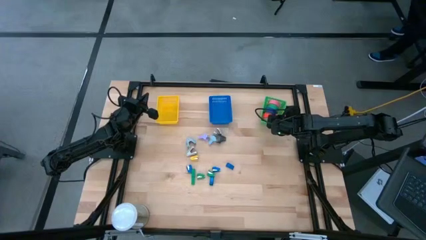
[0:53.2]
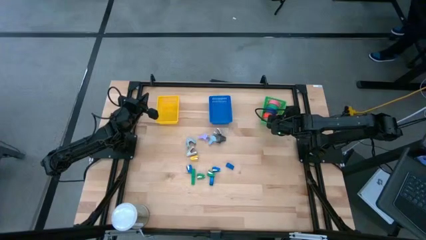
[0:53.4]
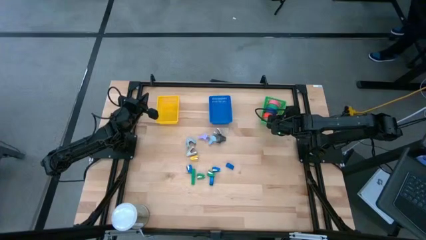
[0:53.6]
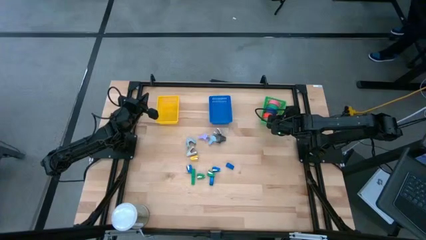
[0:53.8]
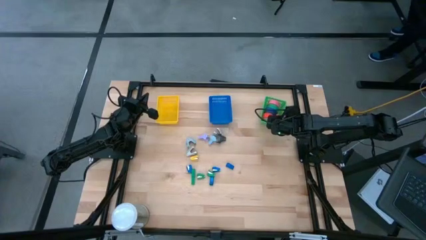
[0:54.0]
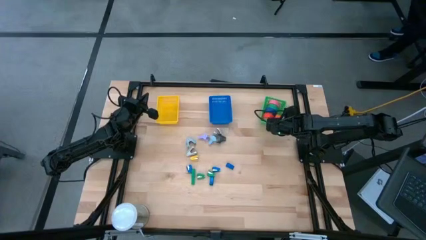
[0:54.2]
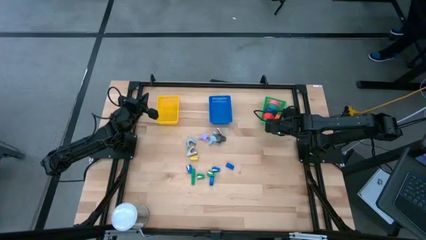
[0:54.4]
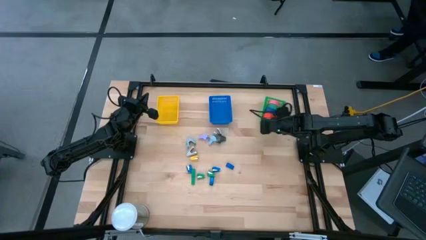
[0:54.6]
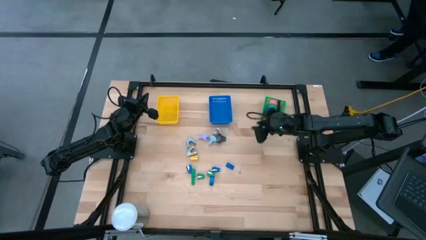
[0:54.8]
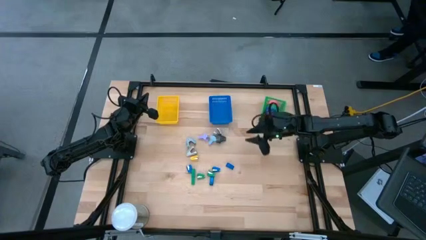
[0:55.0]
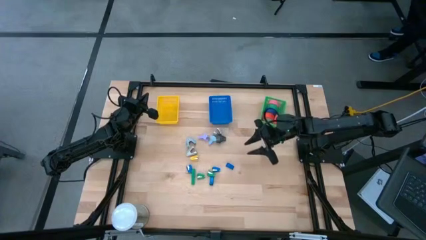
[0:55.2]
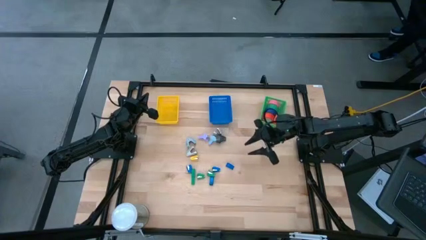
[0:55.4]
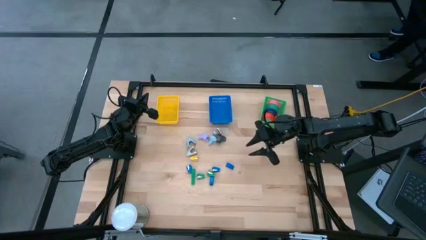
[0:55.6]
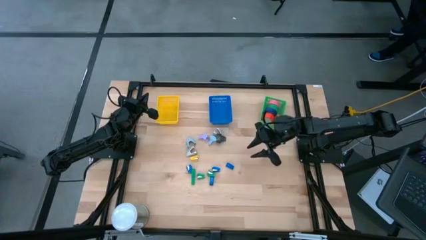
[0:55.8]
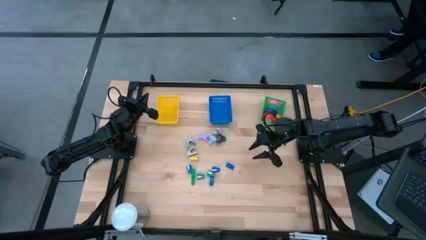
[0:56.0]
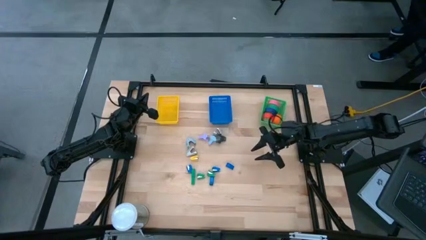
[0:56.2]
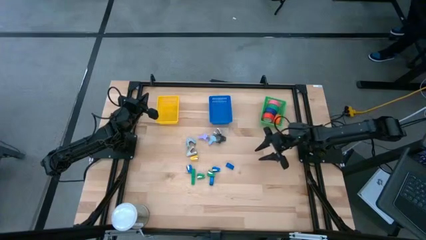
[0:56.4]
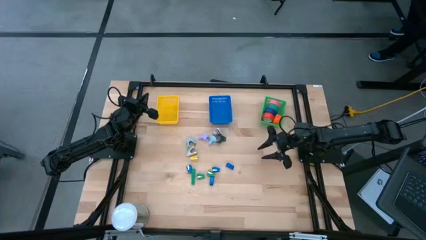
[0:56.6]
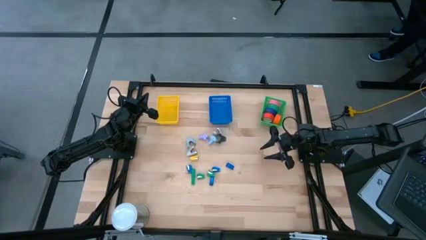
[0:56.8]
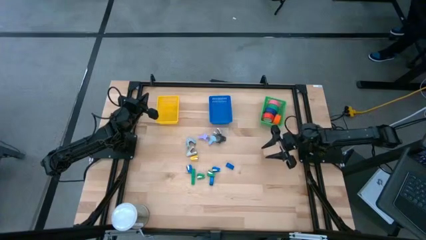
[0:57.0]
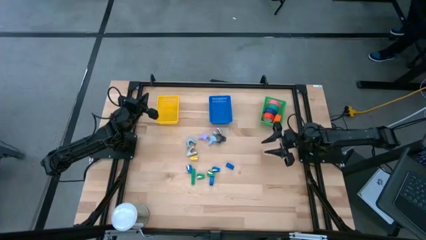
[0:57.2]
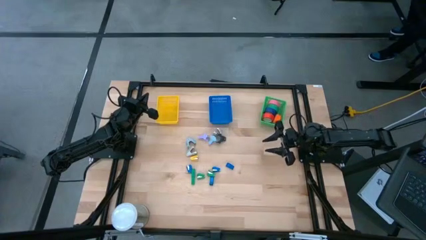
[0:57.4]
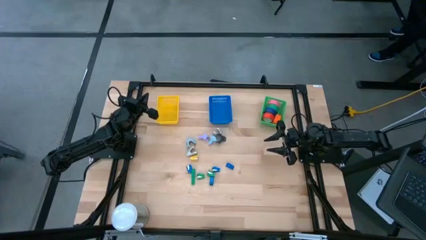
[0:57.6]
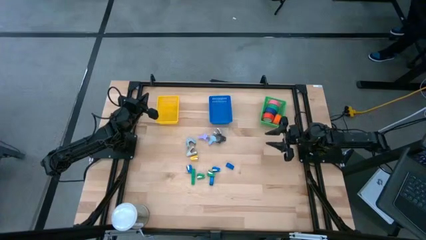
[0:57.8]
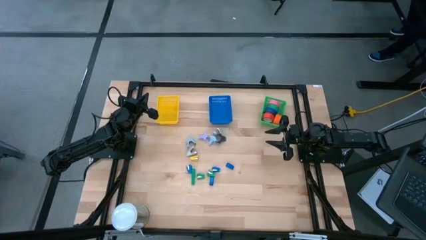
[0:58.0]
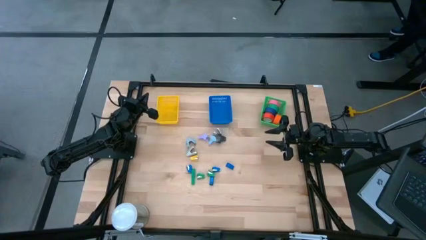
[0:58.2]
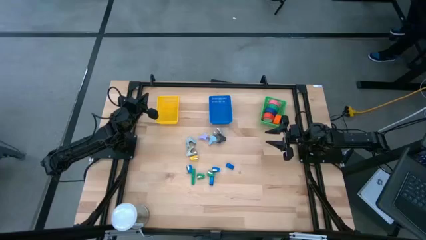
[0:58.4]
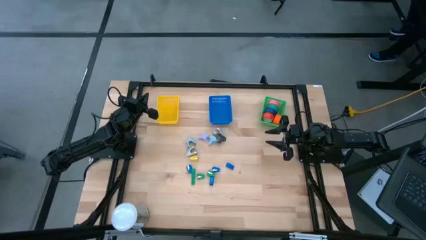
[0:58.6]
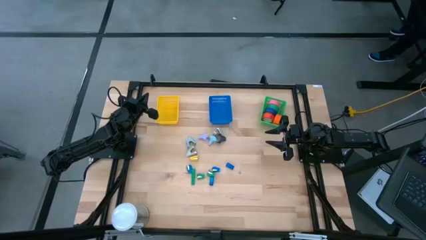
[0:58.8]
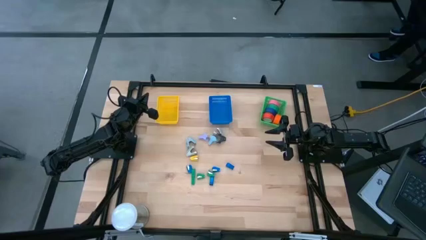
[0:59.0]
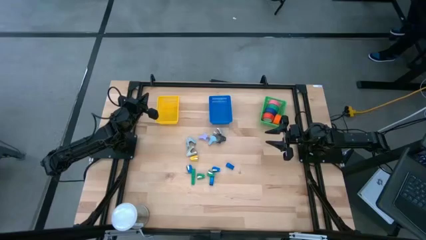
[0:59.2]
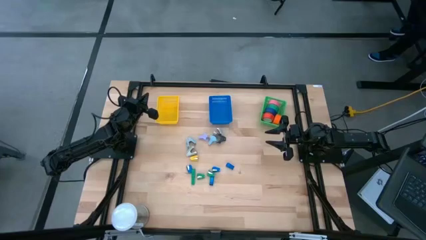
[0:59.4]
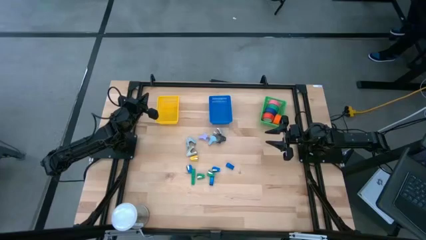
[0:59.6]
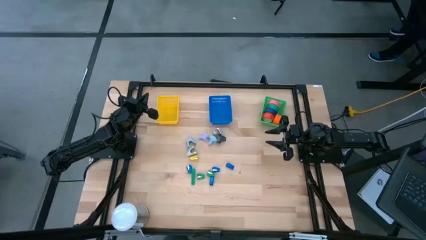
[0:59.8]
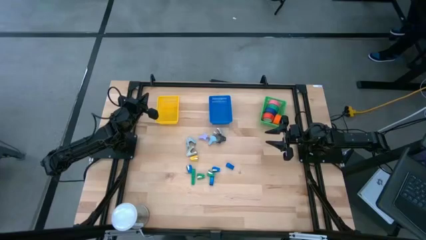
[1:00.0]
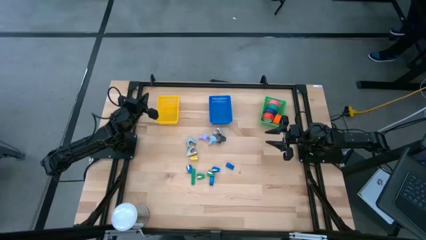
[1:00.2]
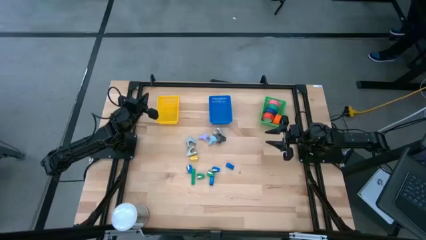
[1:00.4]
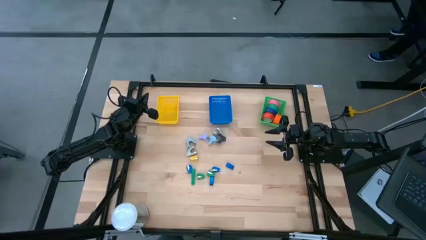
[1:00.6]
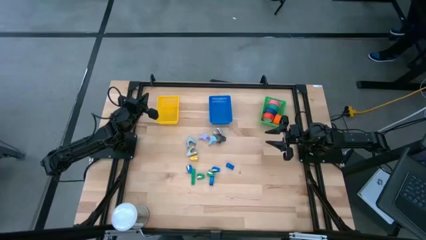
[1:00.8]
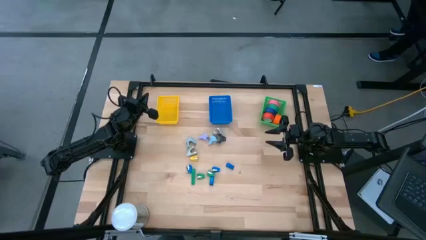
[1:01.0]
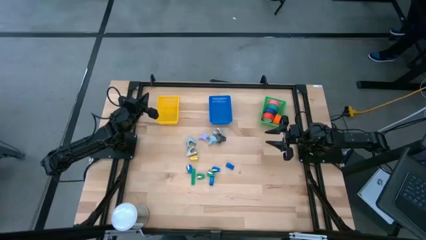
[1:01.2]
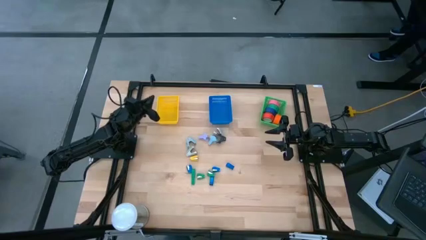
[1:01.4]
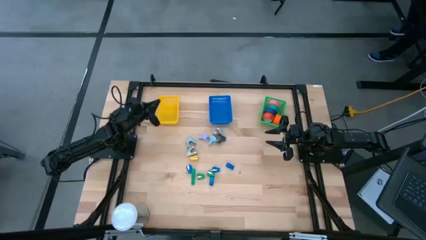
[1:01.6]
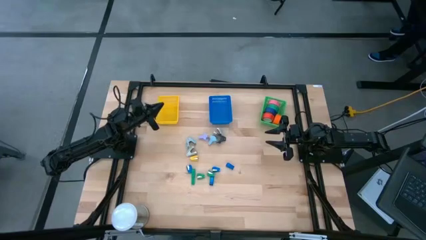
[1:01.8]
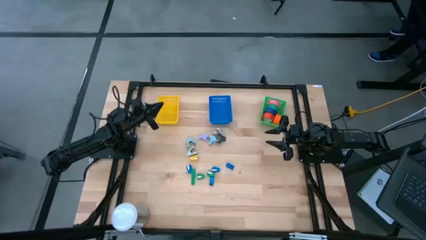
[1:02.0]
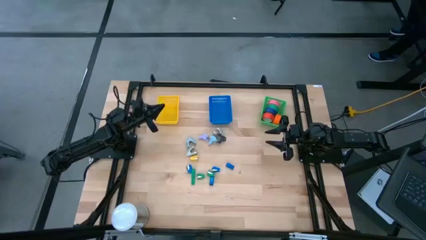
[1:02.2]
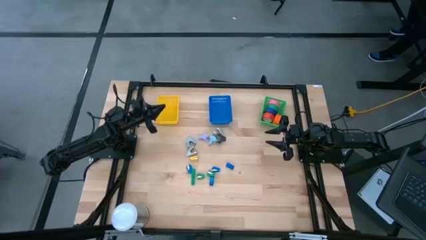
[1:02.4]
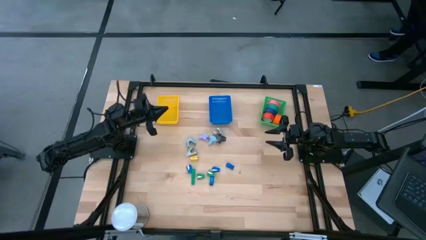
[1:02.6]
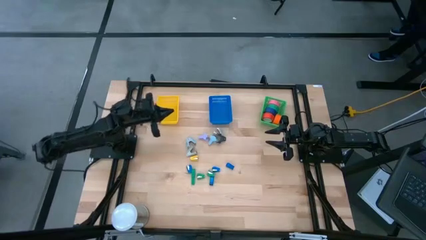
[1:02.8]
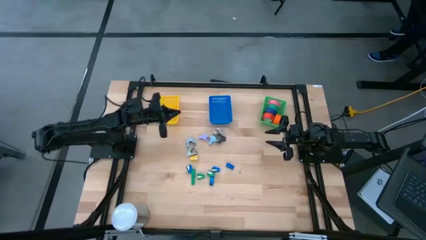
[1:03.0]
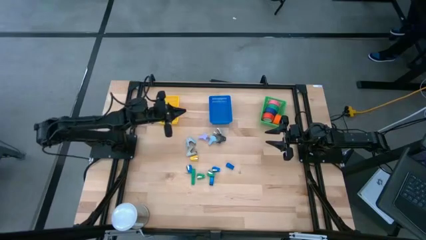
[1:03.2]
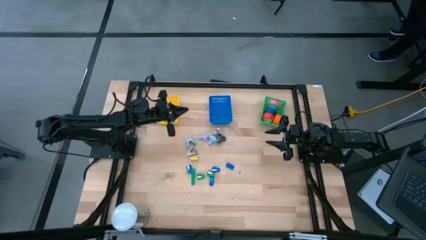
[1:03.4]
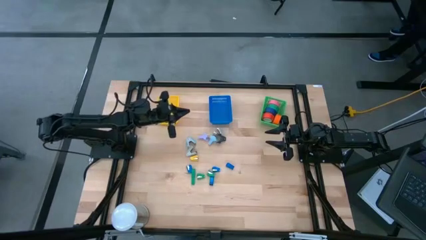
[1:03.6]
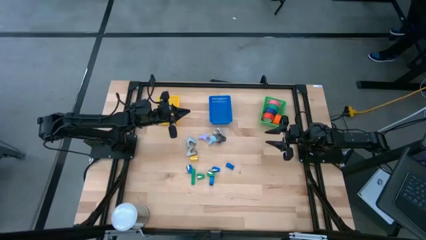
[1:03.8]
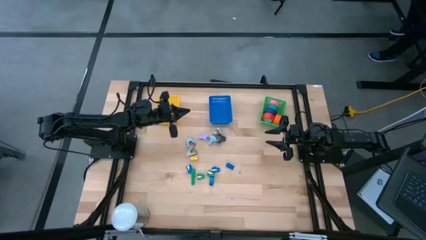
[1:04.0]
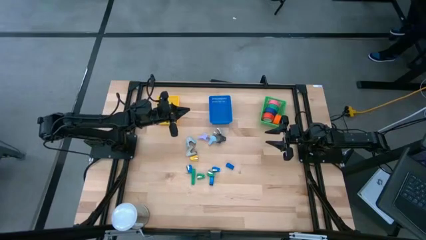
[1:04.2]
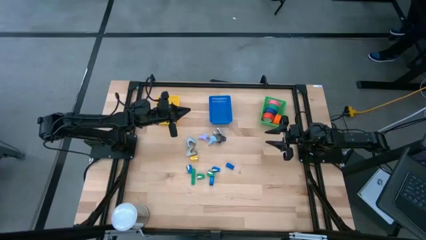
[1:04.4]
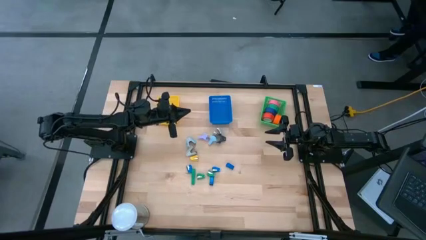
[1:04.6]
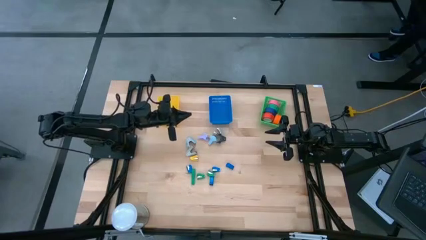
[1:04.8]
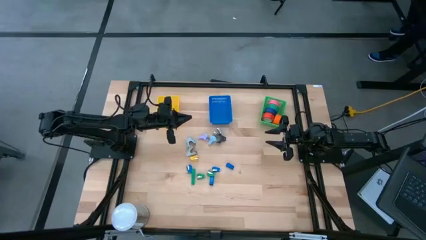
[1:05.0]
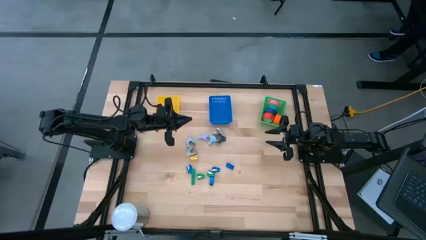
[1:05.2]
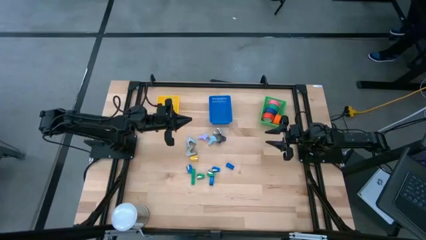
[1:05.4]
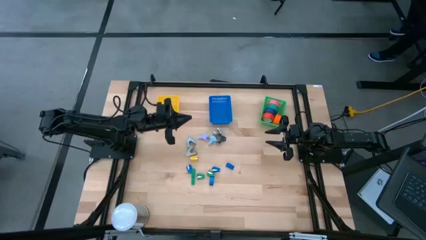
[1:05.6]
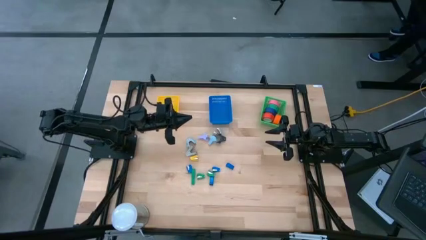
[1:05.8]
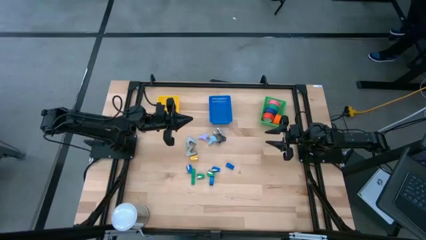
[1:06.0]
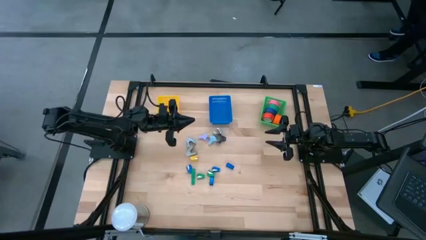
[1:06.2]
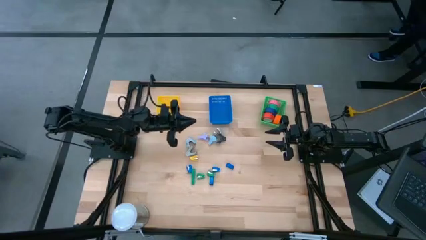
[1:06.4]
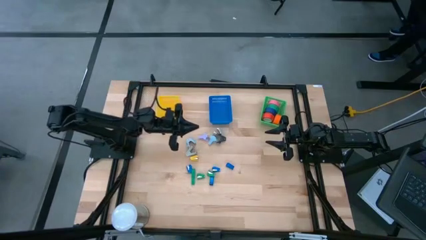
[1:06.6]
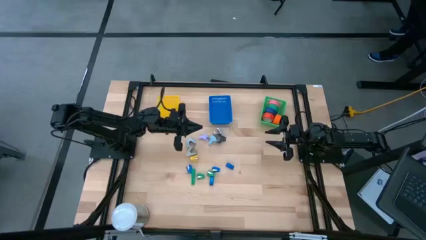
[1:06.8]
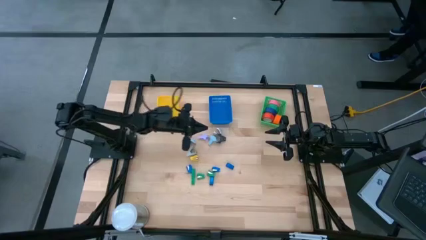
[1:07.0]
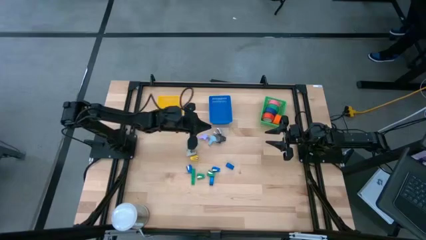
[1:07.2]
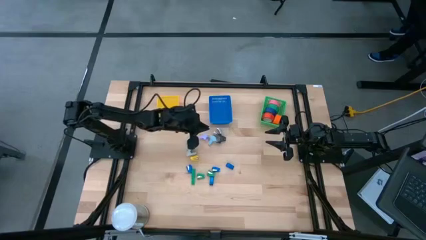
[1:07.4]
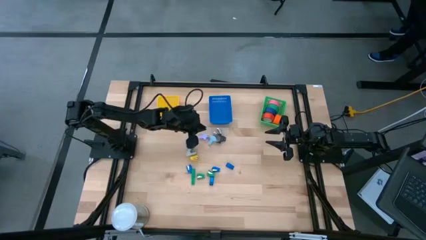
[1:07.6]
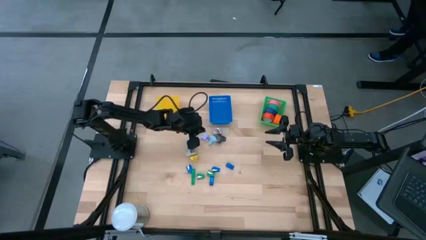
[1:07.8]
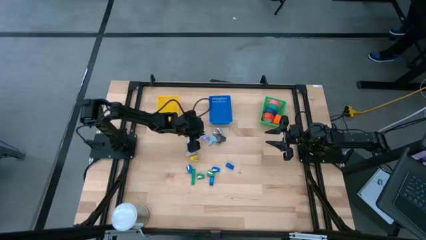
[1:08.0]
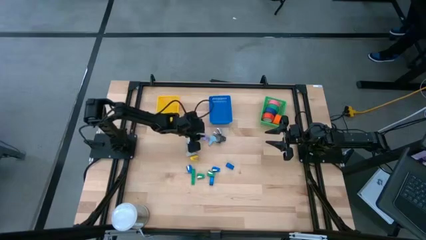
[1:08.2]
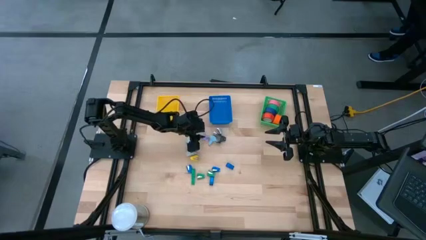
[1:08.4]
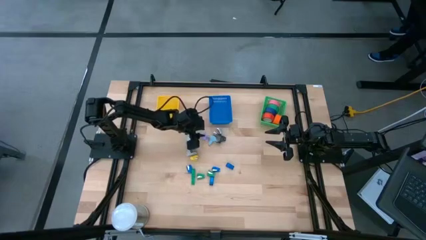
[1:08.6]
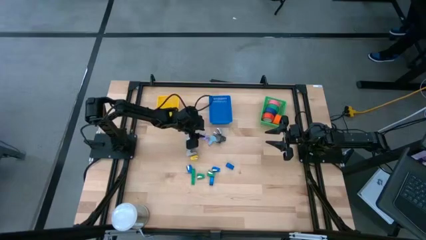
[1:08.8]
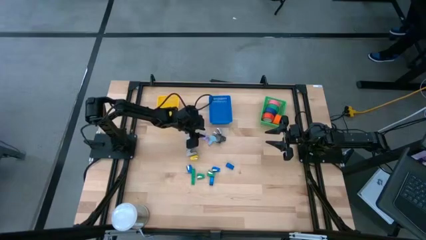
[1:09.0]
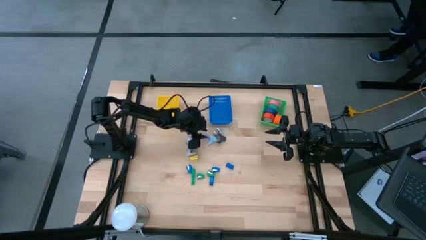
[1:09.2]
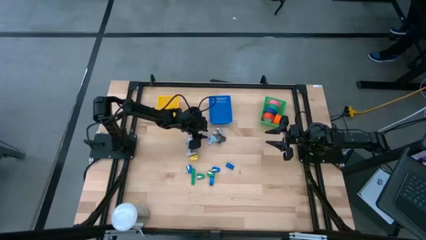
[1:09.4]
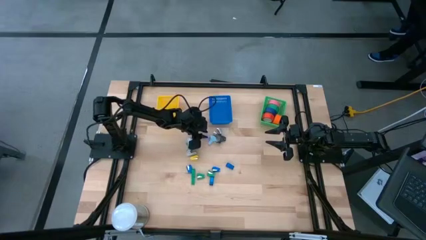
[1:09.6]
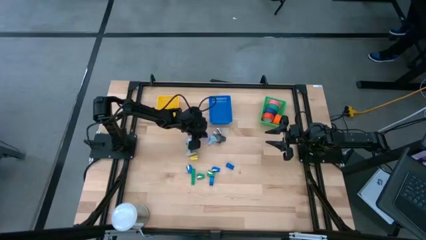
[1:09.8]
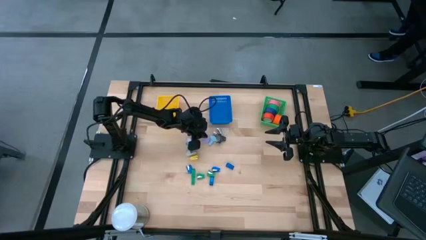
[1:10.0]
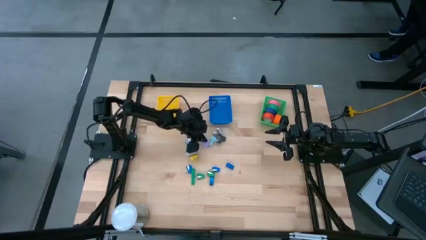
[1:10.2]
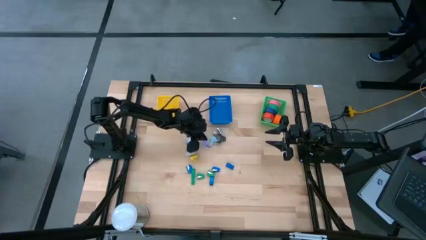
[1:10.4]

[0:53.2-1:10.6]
Task: Pick and place Stapler, Stapler remover, tape
Put the violet staple remover into the yellow basket
